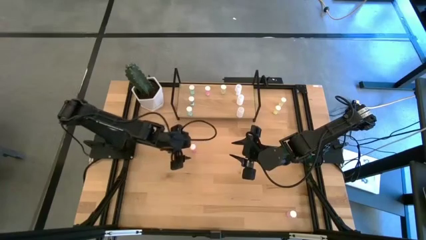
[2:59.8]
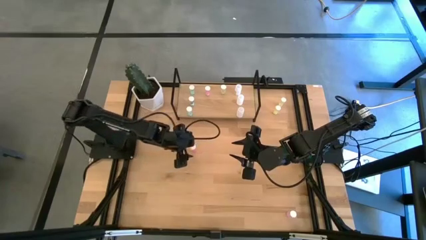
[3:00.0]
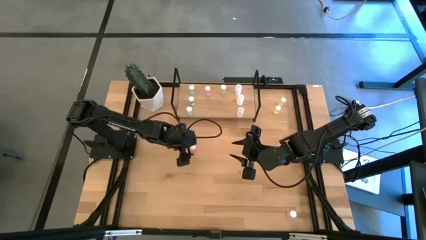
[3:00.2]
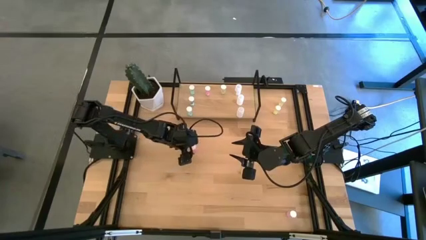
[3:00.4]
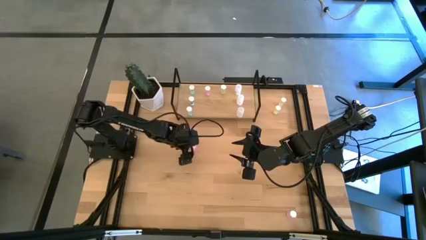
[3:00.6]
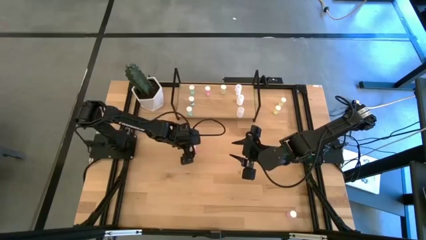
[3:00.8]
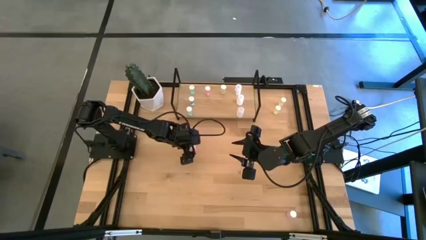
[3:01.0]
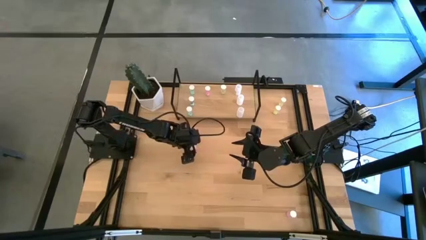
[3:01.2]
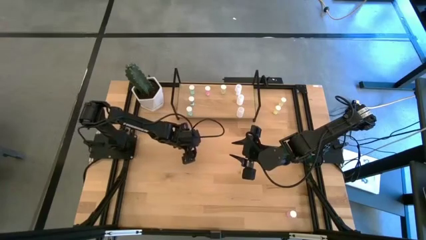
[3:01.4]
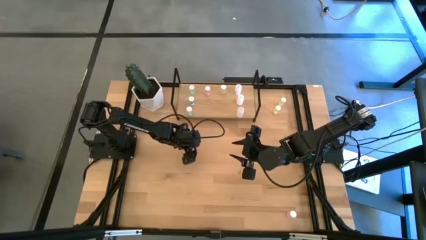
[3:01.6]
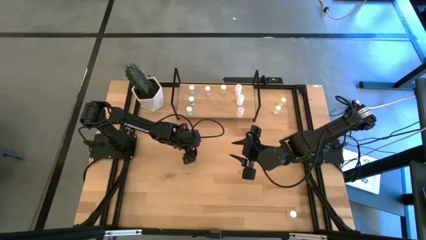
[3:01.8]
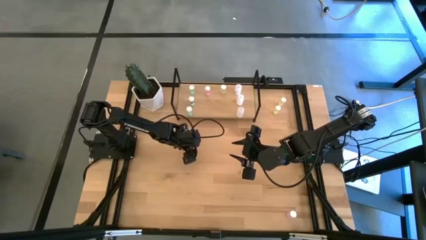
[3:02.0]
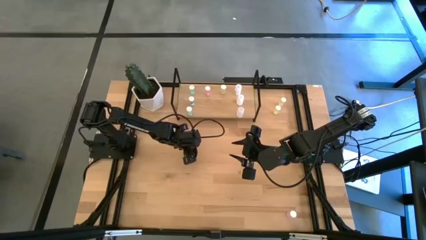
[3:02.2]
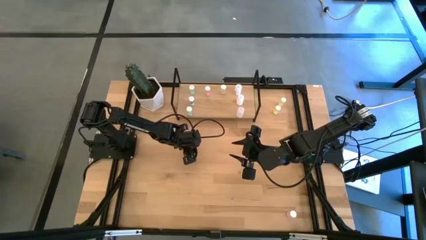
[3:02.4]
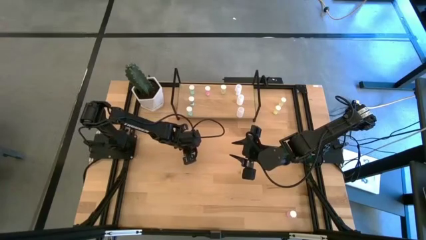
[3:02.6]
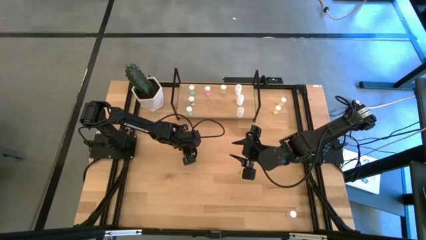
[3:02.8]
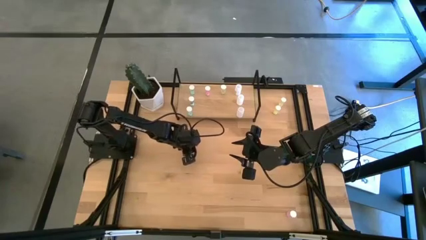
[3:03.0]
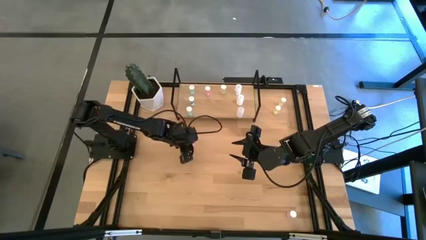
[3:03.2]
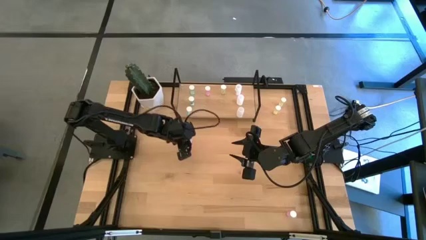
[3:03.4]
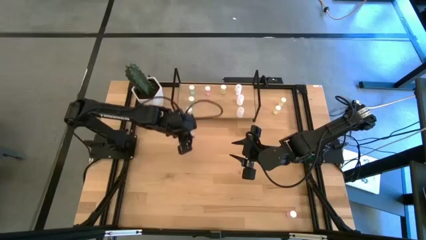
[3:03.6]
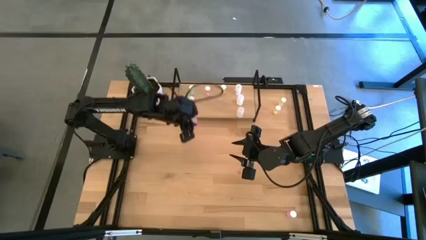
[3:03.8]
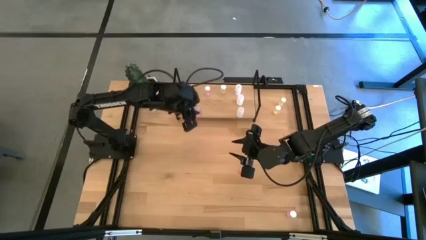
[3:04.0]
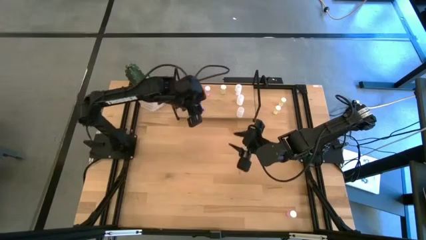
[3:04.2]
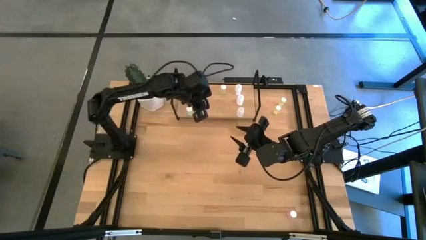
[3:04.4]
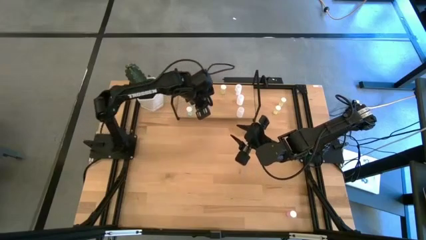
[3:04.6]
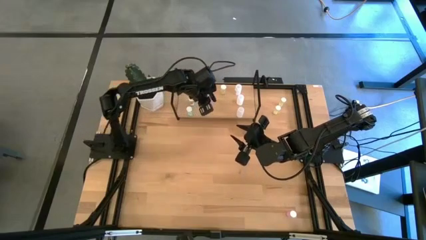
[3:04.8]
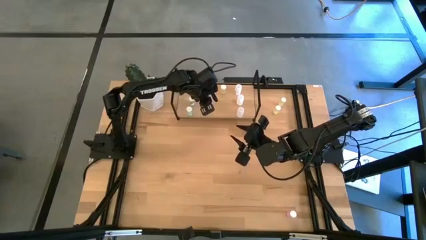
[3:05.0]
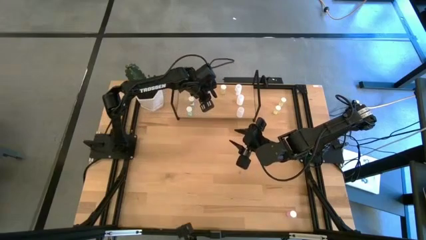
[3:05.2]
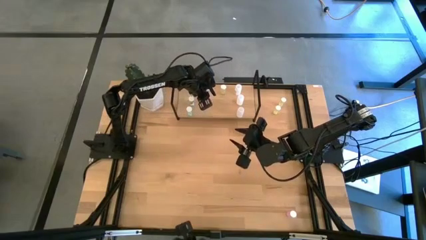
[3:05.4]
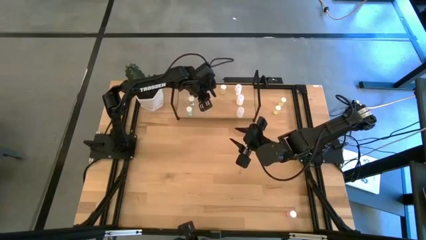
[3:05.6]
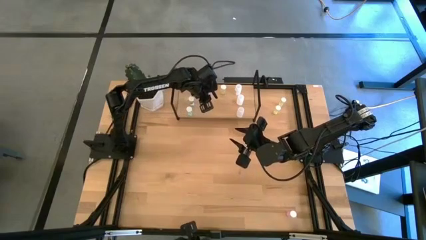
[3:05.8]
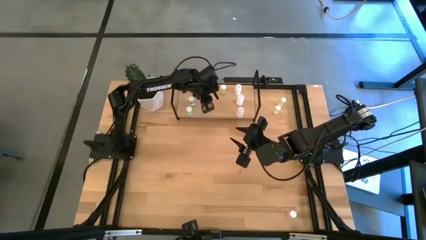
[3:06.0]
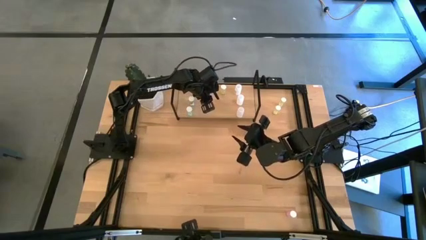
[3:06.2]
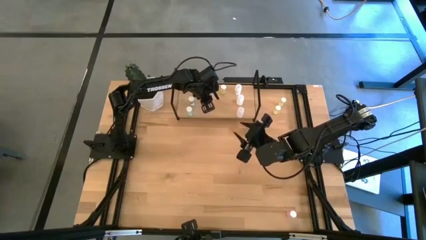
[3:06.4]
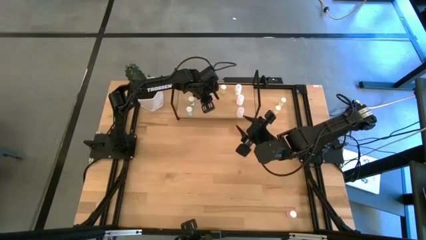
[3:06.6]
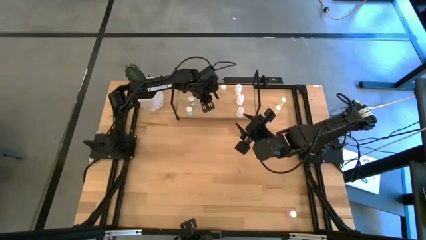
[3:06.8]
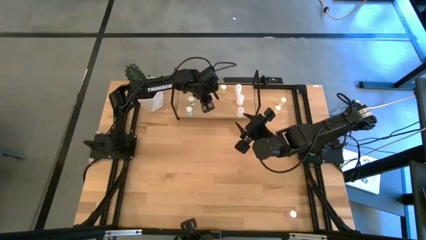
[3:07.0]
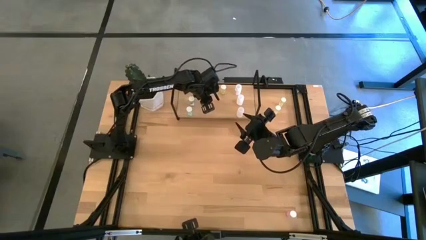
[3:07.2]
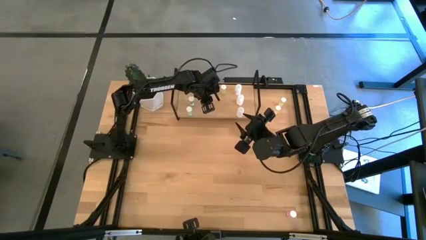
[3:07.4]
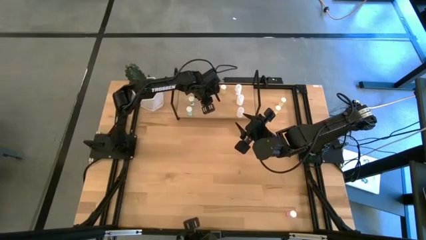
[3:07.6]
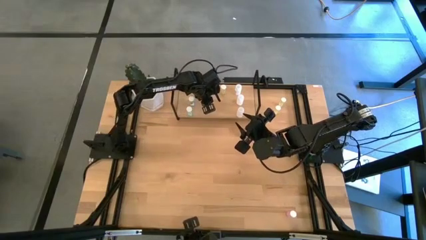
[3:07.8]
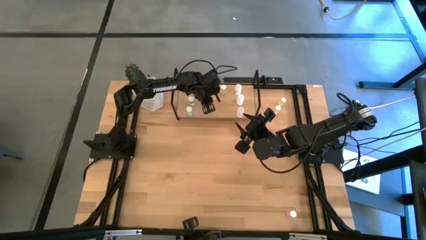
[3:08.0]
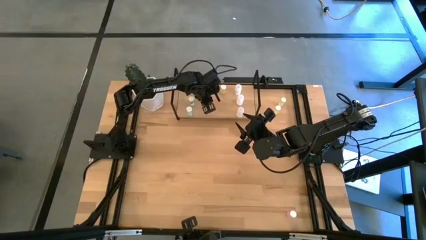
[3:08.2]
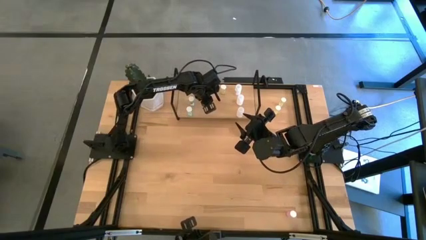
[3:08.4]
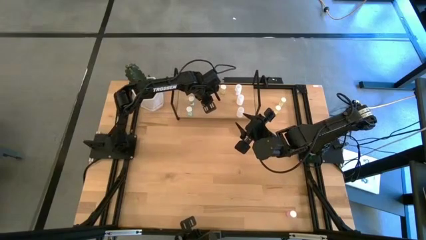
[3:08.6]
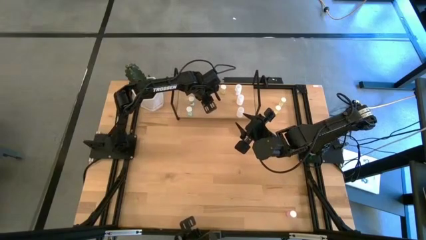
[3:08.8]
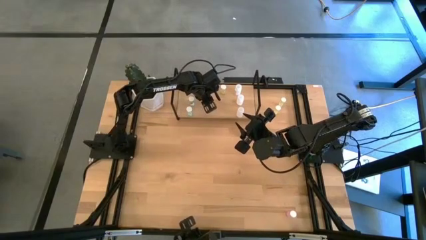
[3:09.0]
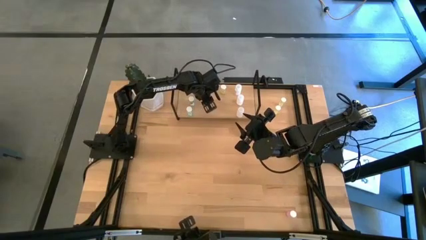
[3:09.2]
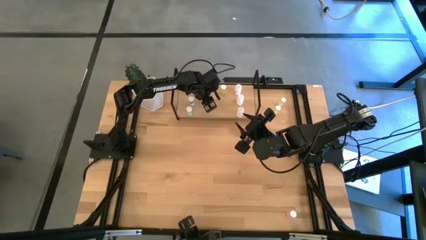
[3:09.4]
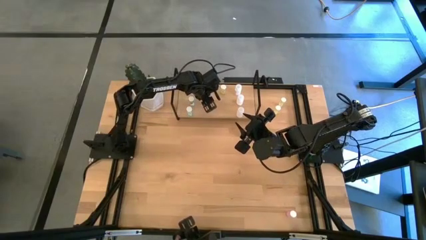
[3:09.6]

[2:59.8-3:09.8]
Task: Pick and place medicine bottles onto shelf by color
Put the left pink pill bottle on the shelf aligned with the other pink pill bottle

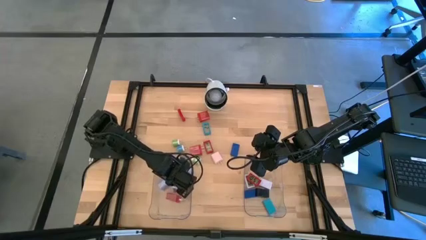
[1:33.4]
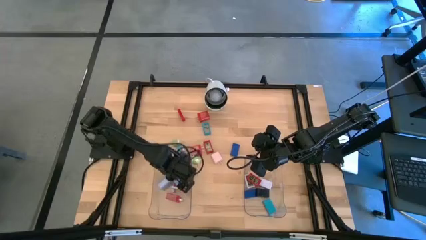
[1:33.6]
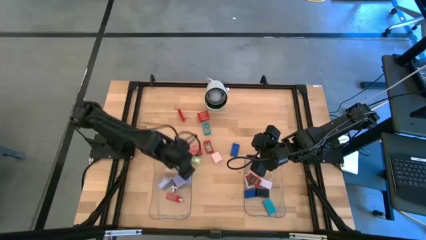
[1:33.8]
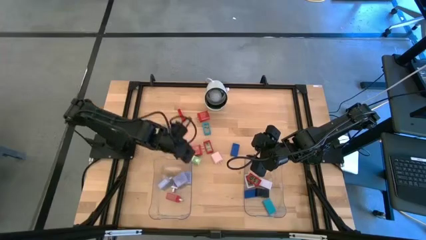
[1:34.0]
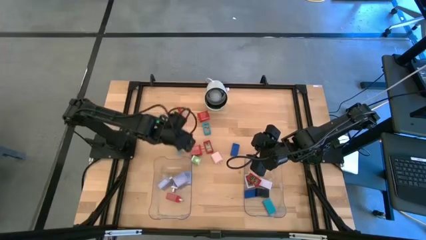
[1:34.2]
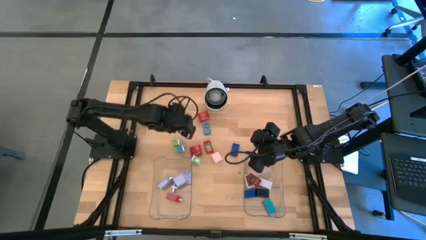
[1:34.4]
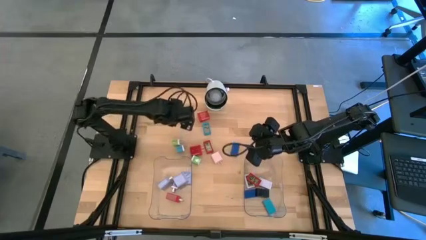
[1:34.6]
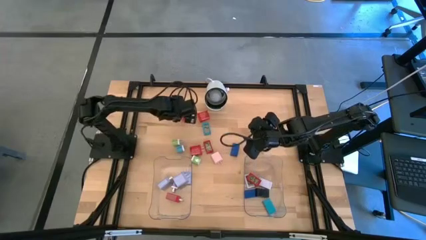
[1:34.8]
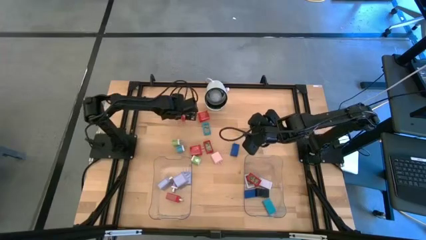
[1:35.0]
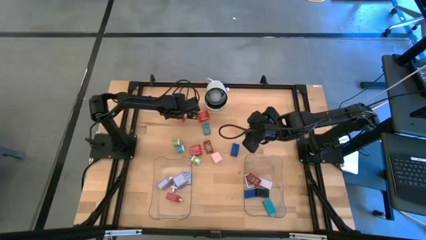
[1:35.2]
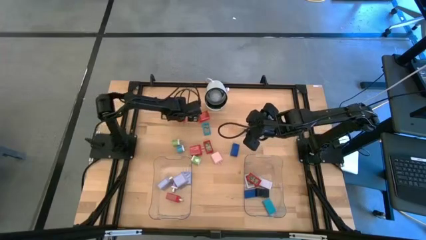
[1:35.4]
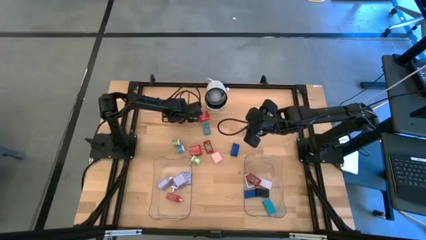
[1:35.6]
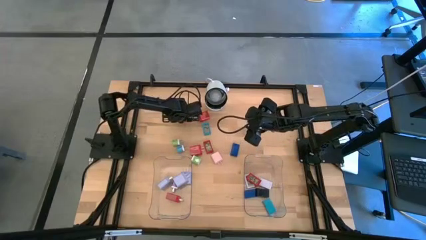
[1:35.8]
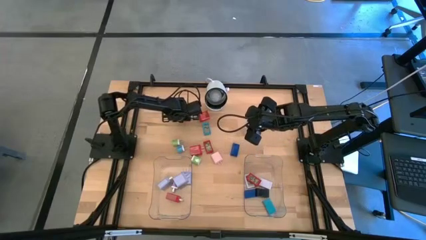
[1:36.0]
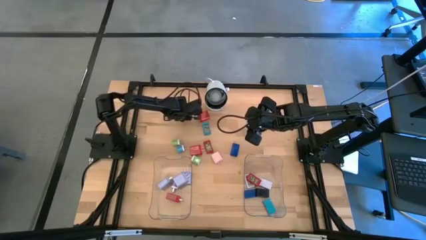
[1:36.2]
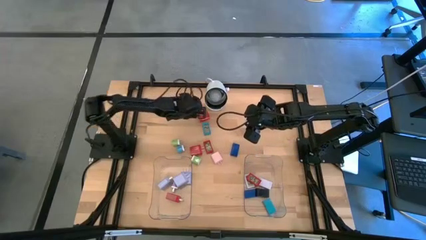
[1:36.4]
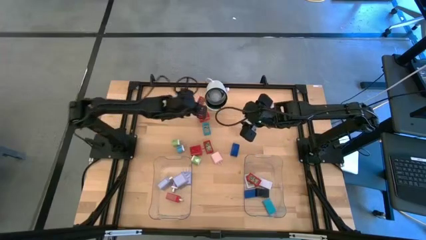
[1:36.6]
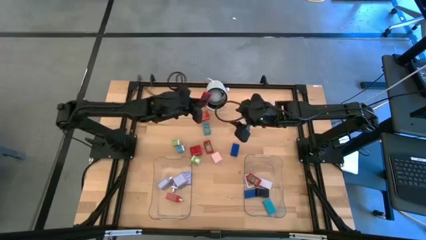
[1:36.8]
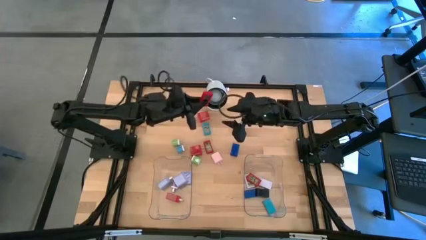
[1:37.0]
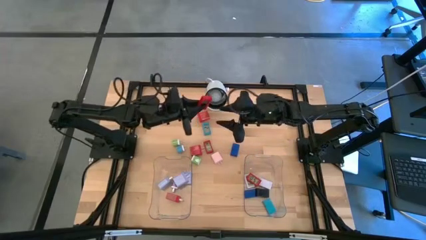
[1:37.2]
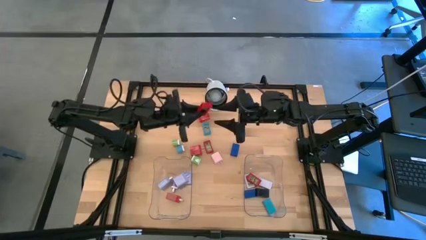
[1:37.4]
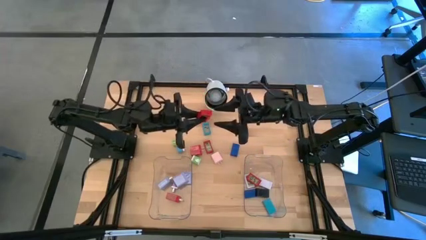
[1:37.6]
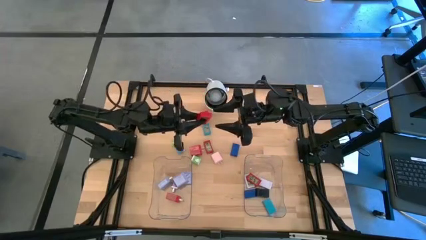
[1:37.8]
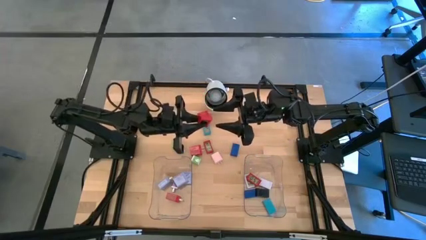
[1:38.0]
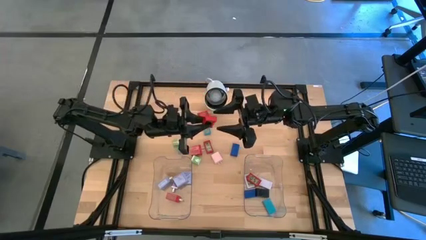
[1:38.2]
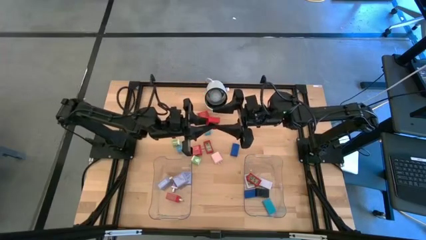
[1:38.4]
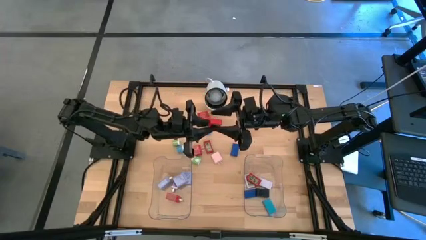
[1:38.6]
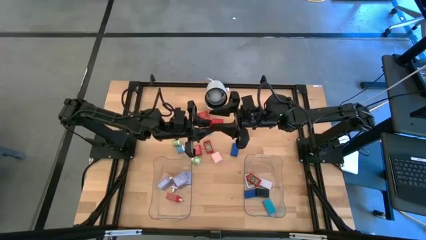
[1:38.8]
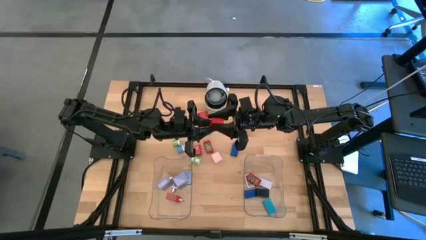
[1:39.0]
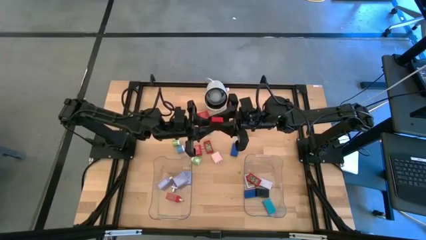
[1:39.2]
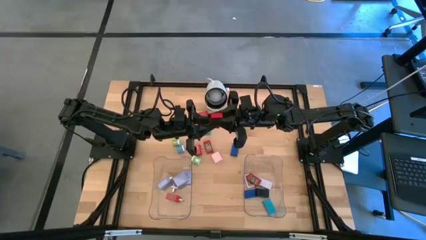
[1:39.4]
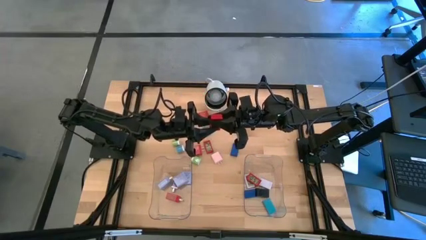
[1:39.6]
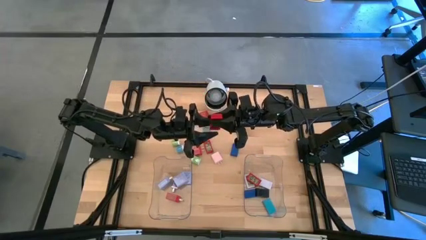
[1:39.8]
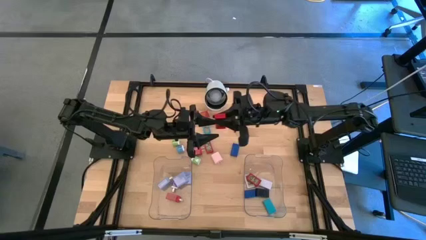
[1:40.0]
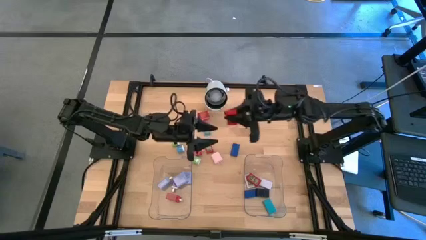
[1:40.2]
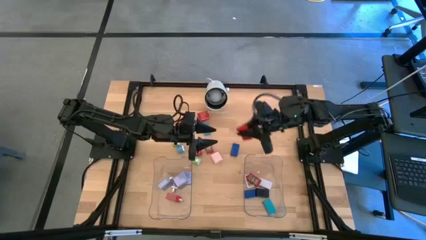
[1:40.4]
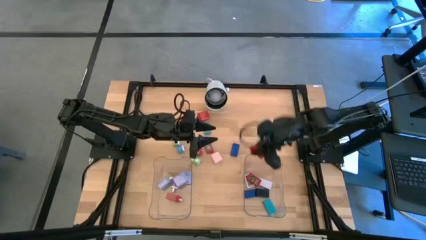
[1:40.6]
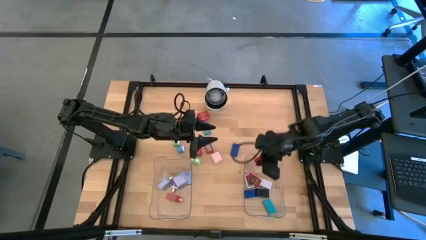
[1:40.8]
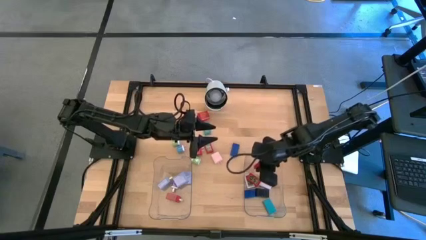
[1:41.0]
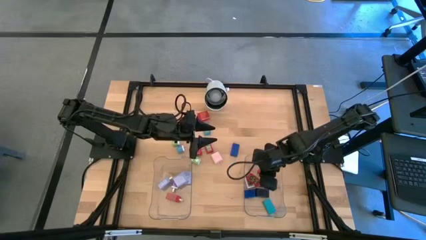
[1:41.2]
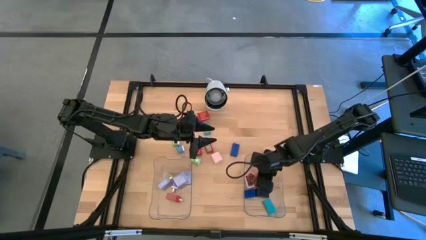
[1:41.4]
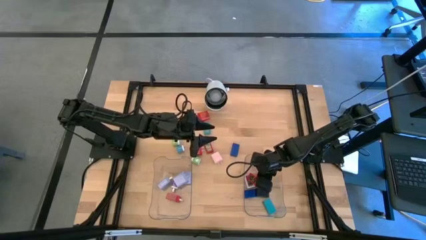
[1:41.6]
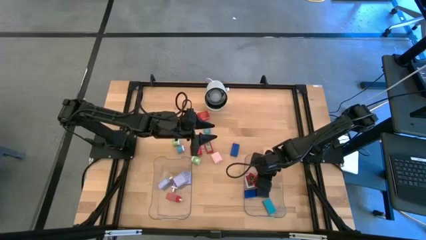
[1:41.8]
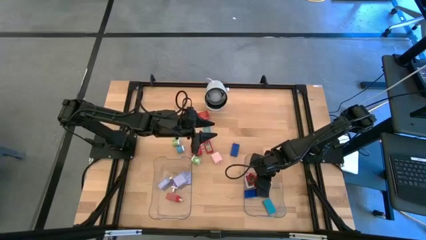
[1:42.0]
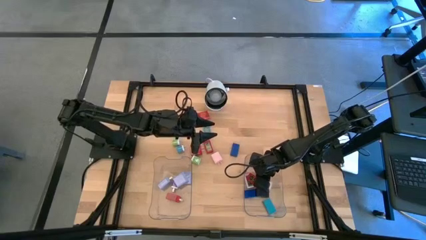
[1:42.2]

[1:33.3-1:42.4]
Task: Pick & Place Office items
Put the top red timer into the right transparent bin
